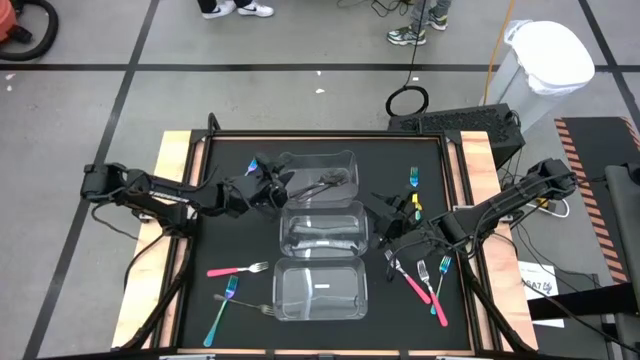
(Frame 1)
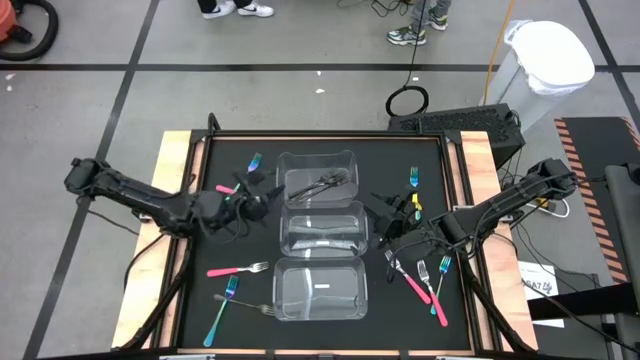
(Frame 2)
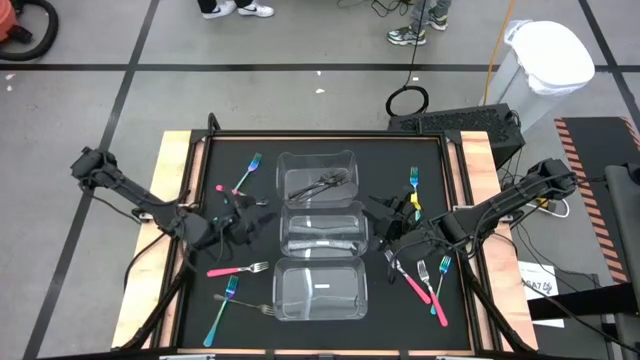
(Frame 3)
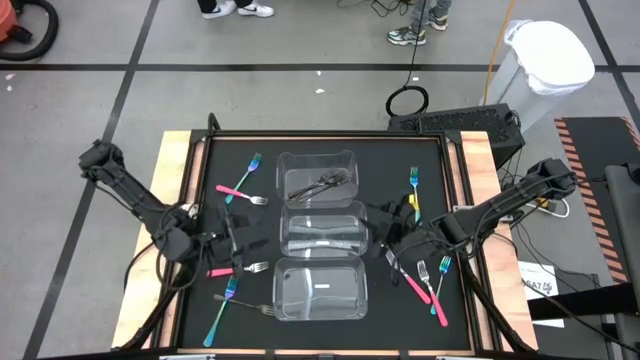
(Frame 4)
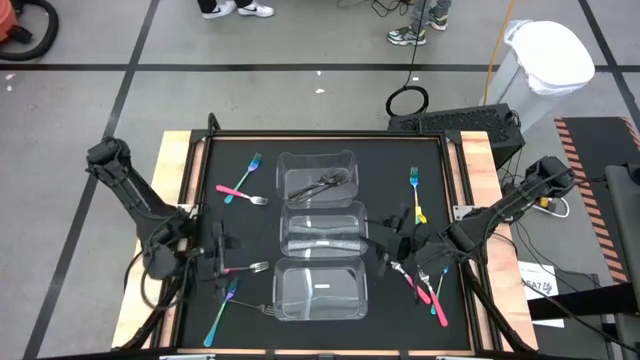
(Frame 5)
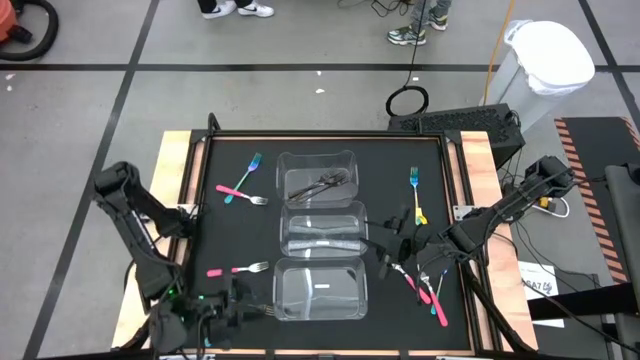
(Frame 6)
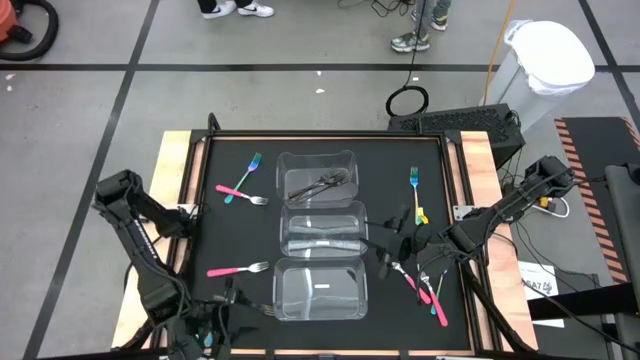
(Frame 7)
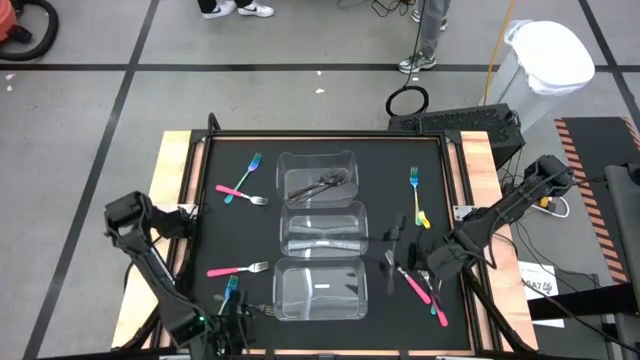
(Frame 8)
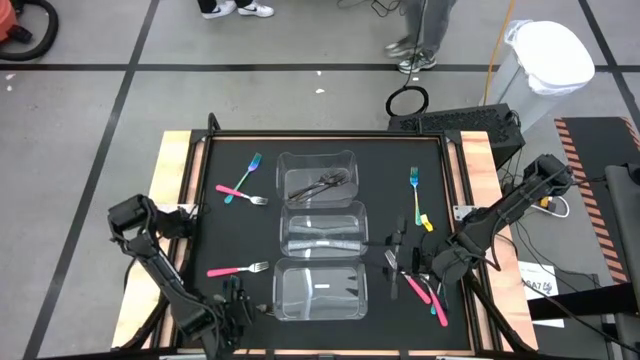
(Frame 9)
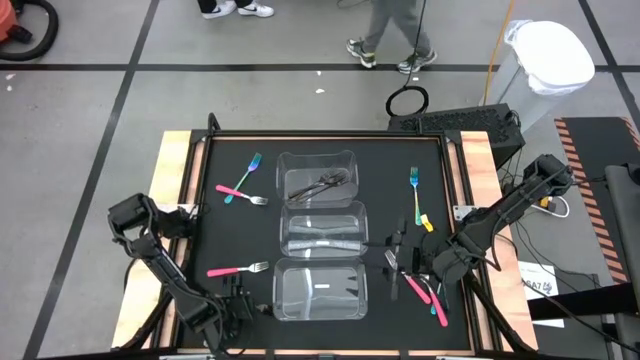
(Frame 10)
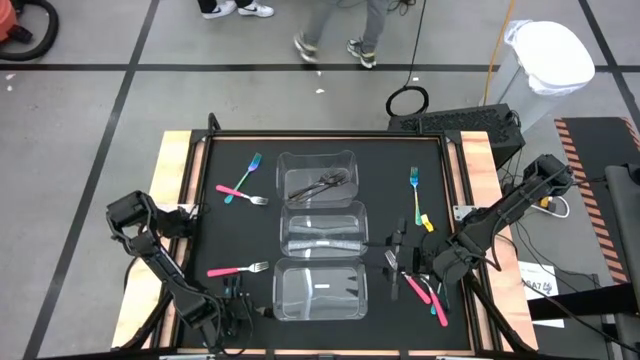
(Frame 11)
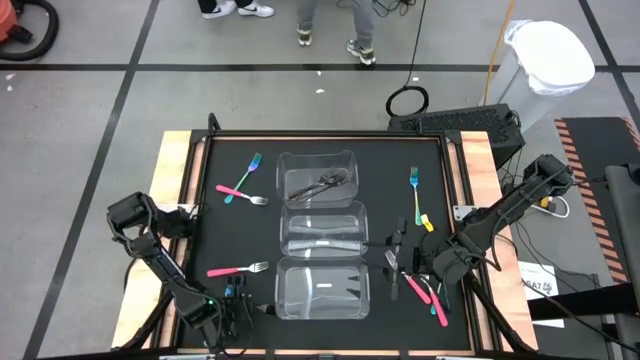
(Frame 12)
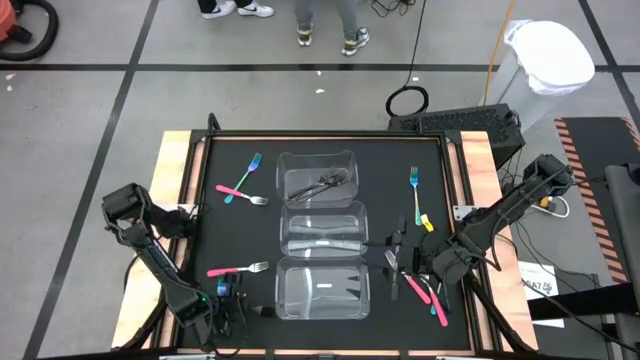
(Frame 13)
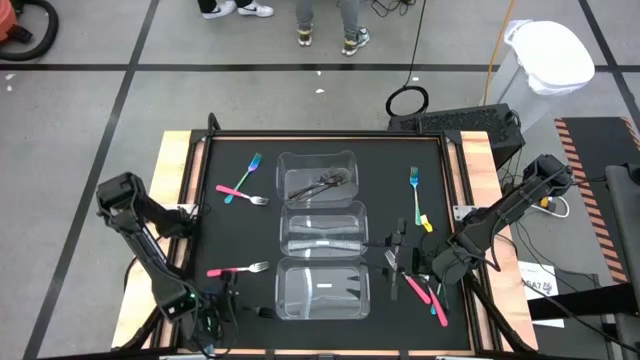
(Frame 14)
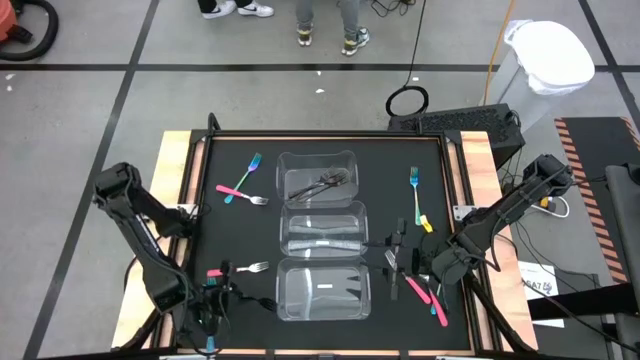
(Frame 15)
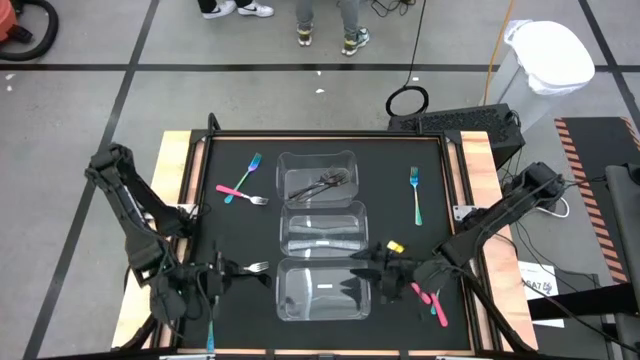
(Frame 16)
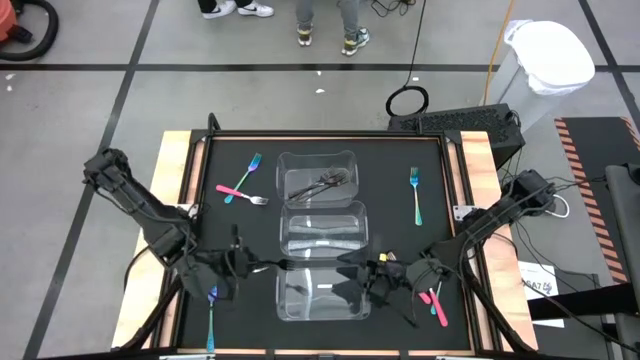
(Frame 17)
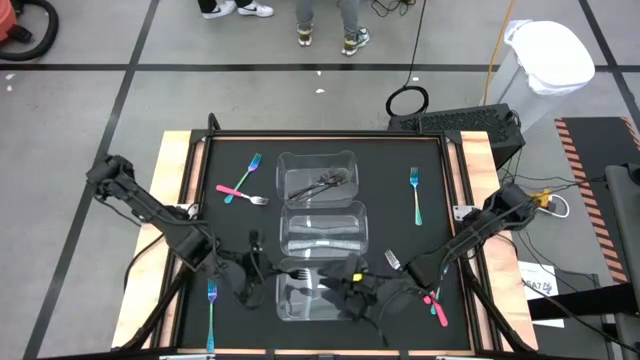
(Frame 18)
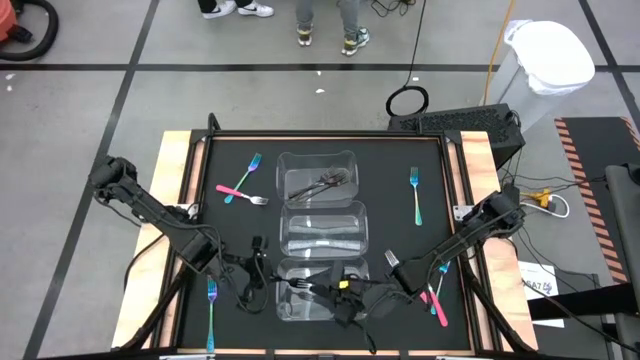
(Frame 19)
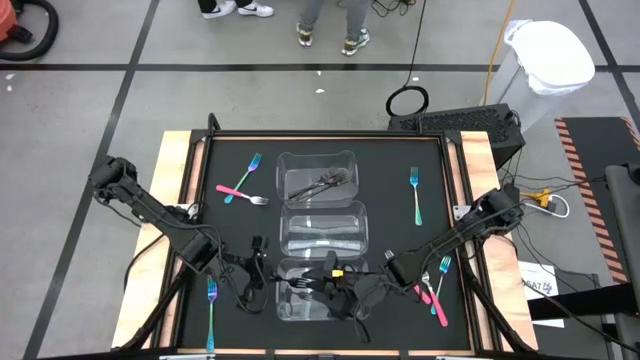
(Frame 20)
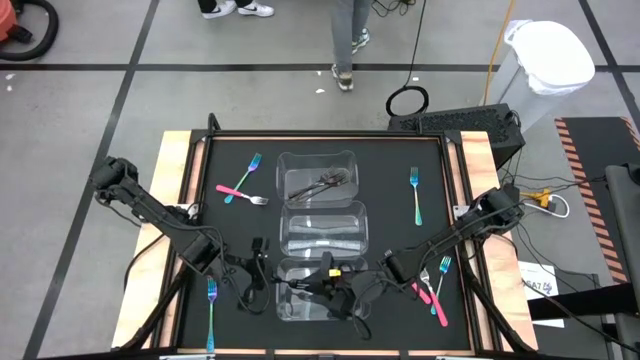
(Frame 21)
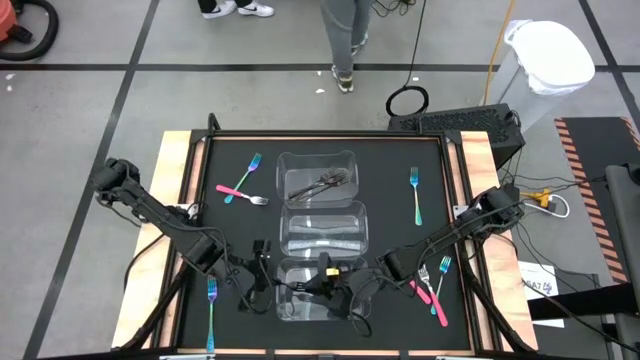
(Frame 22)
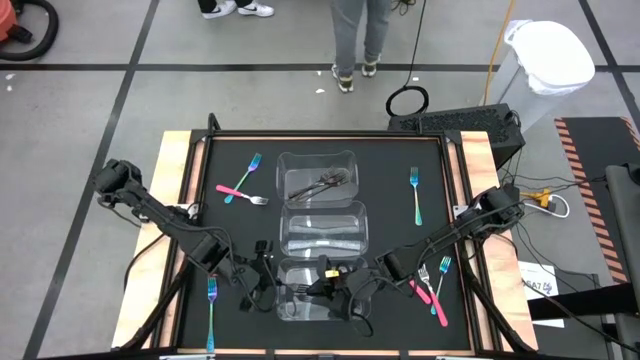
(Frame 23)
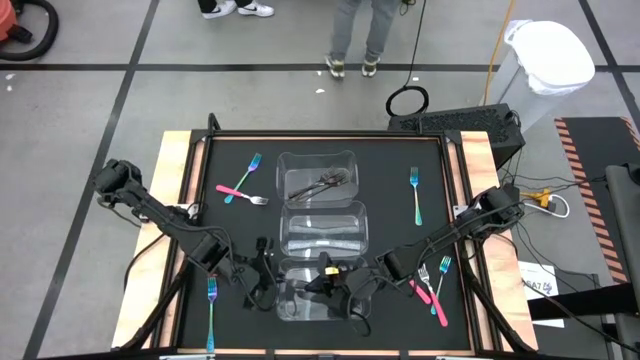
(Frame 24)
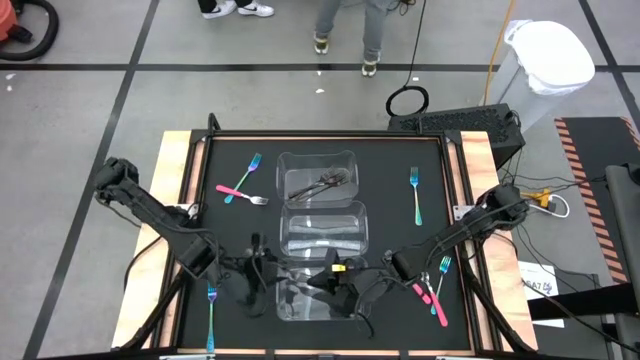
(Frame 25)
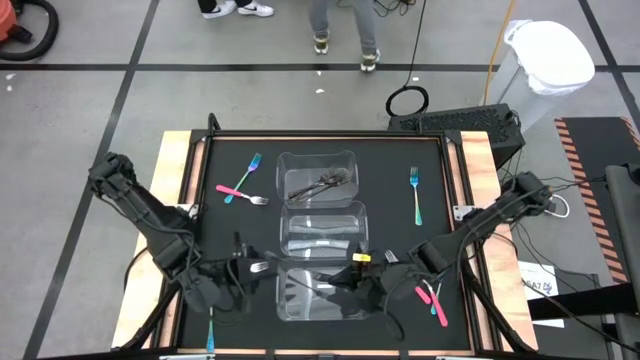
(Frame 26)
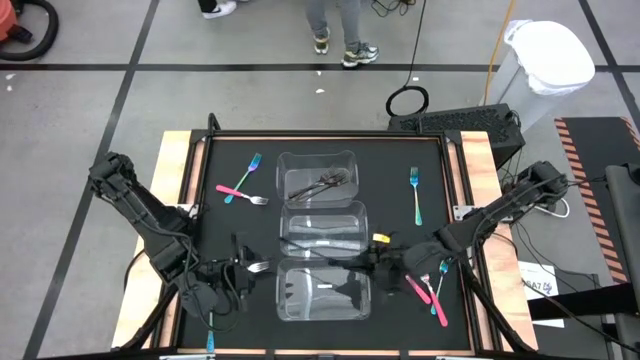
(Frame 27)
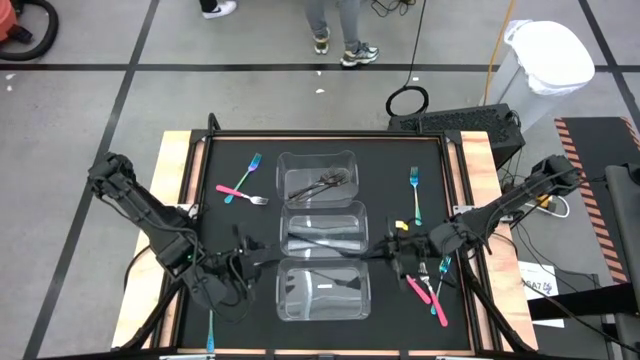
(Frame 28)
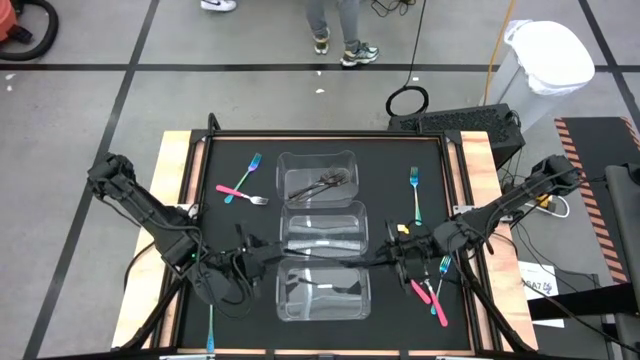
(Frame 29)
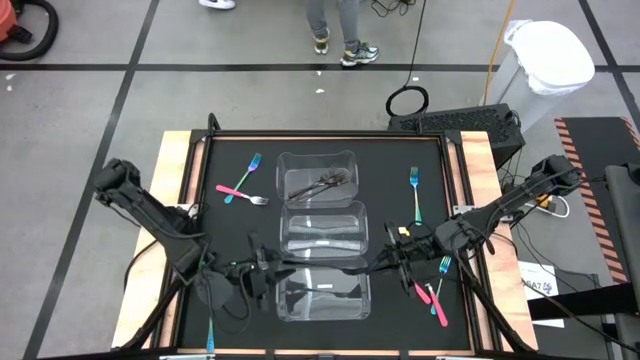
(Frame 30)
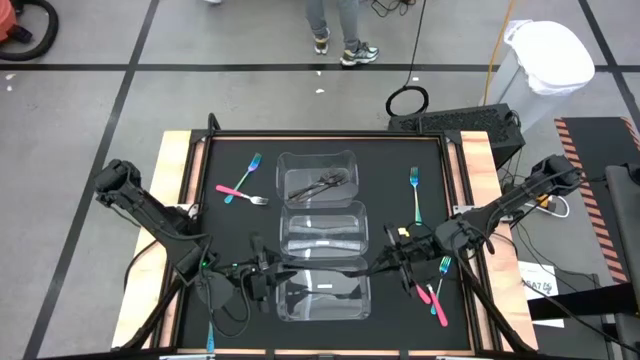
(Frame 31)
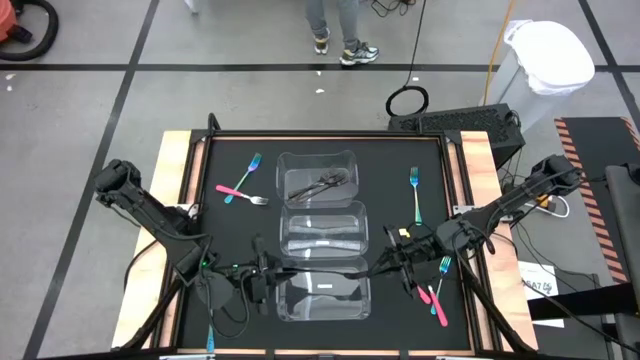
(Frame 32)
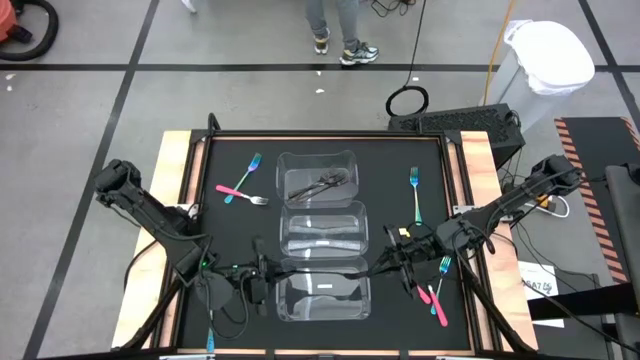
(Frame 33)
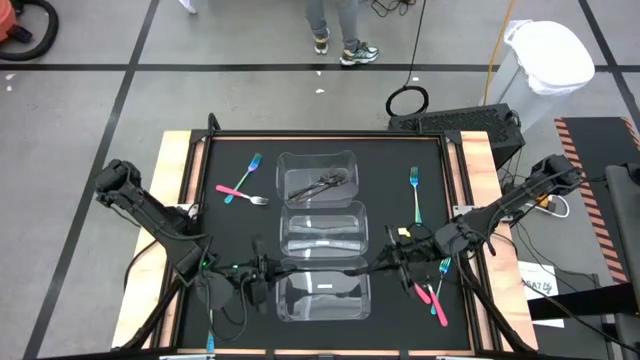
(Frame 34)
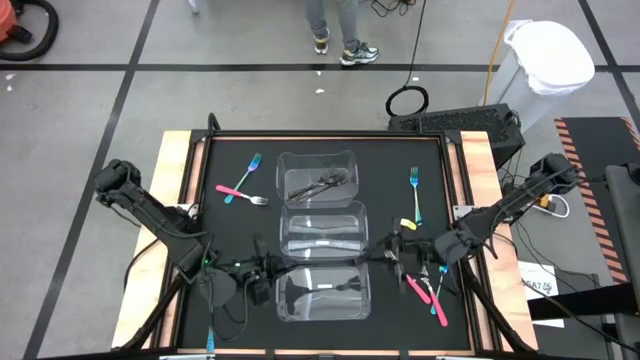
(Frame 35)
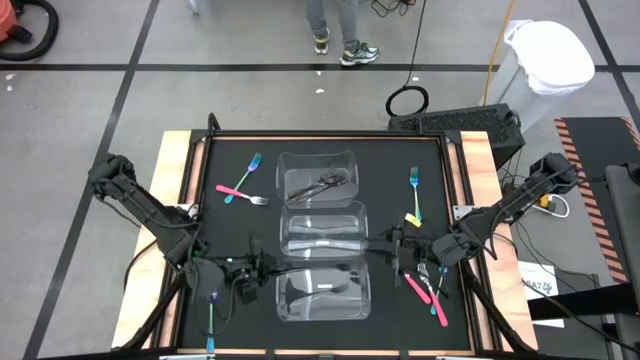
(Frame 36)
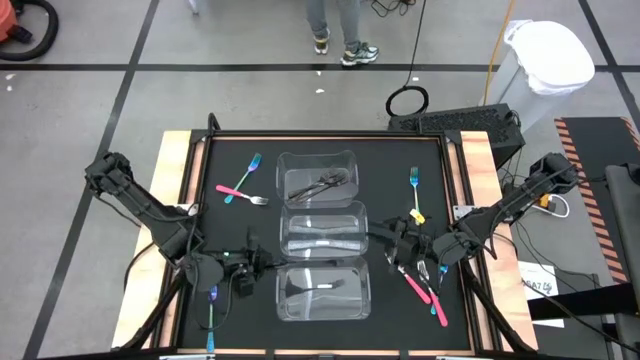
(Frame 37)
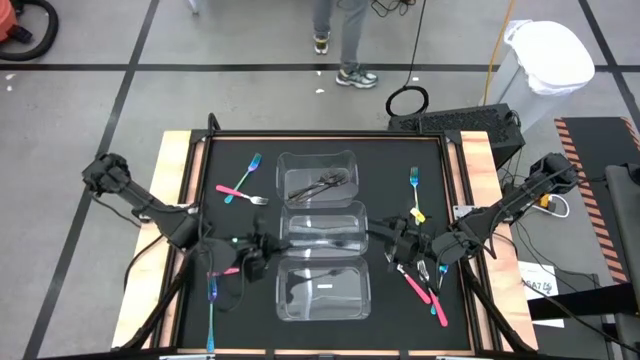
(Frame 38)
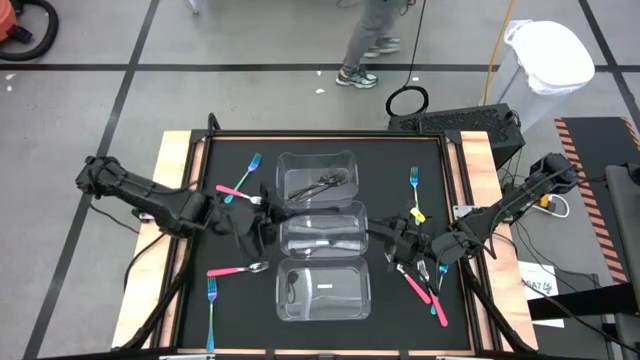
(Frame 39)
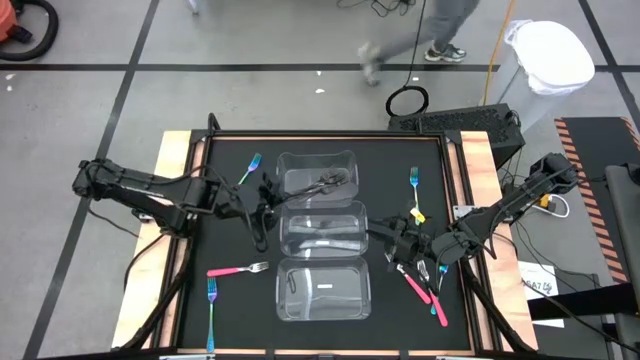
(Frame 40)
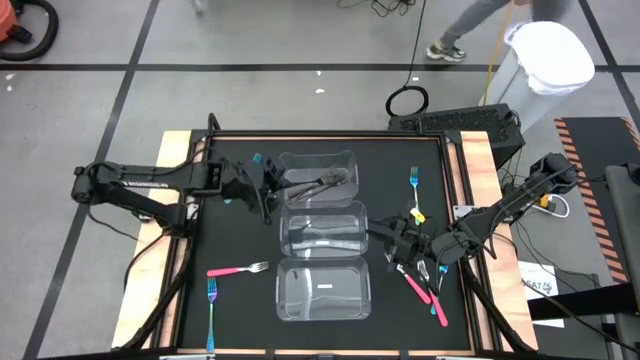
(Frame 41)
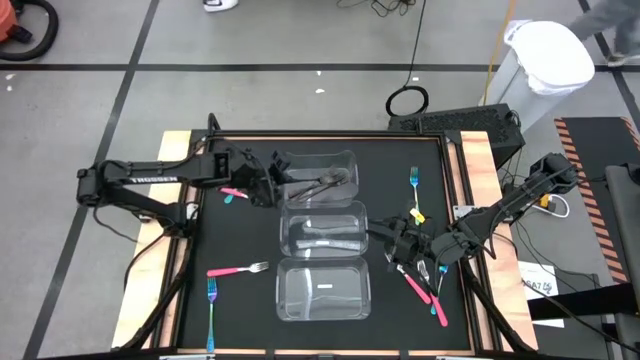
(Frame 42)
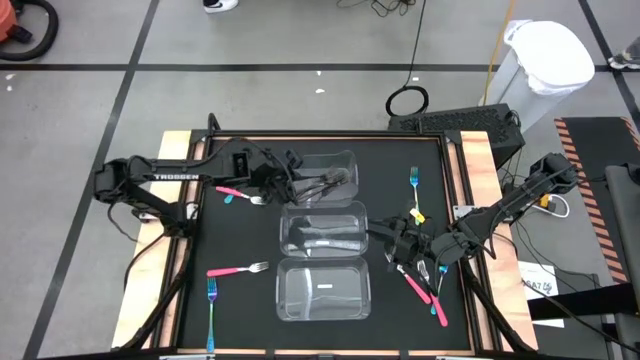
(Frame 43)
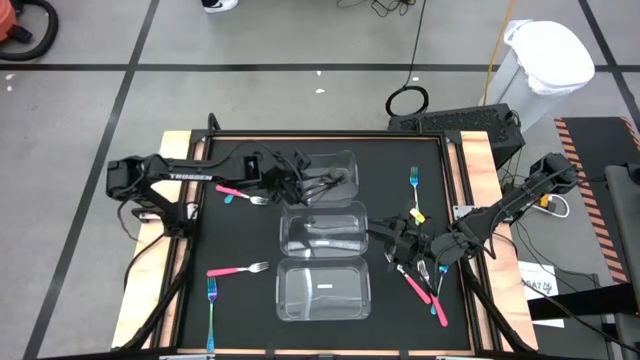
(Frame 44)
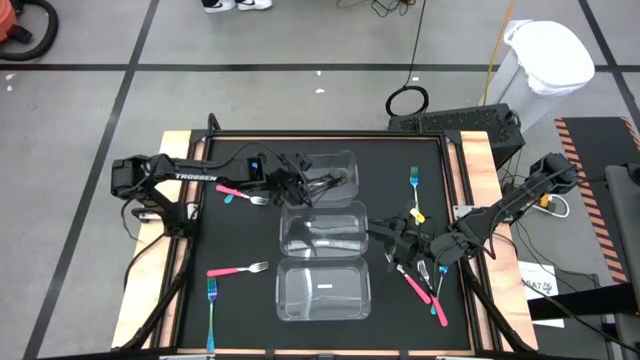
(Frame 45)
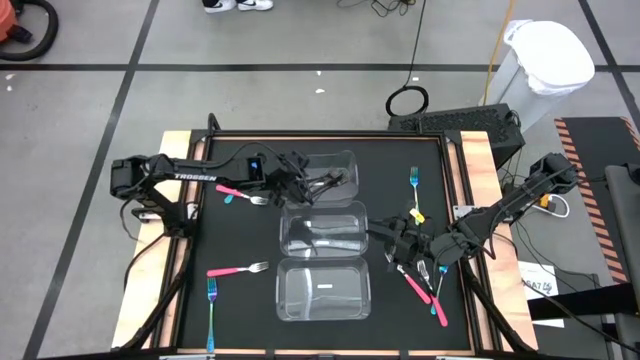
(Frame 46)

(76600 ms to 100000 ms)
Task: Sort silverware by color (type)
Put the black fork into the top transparent bin
